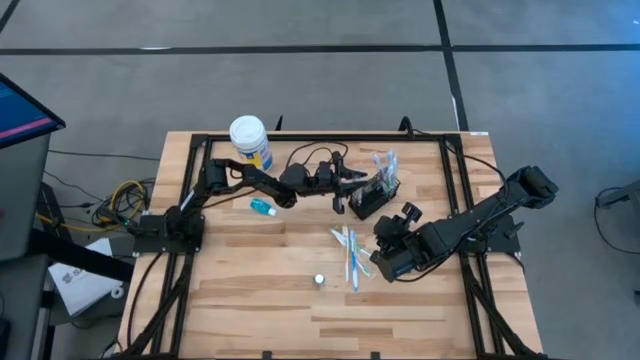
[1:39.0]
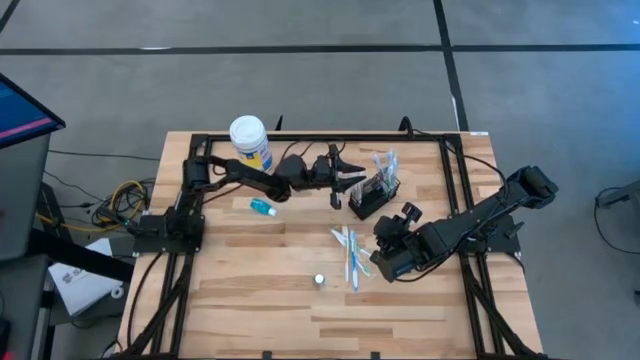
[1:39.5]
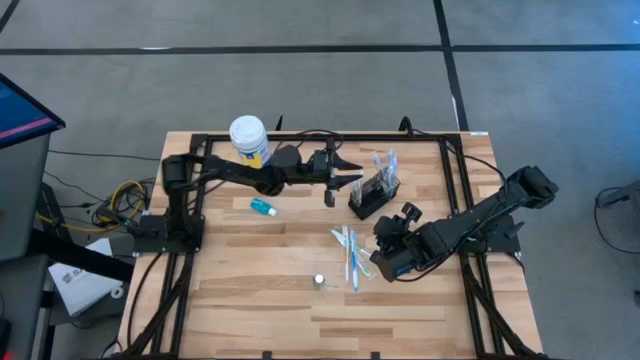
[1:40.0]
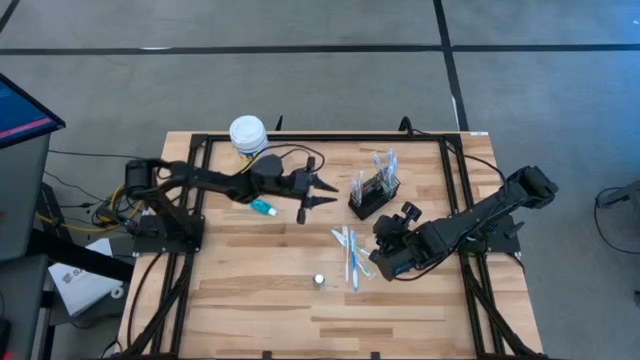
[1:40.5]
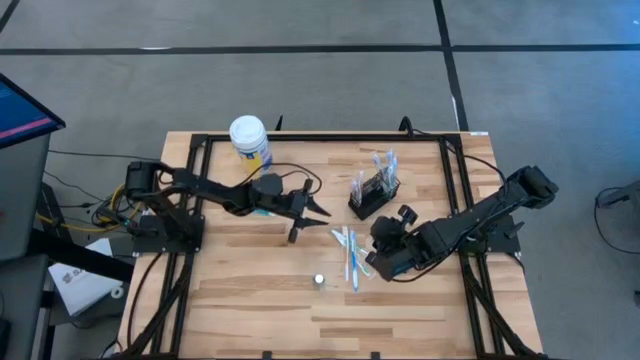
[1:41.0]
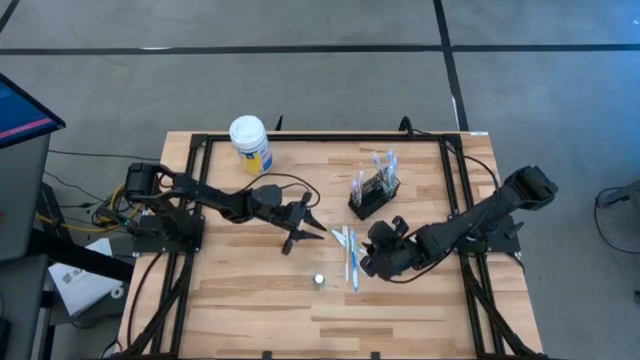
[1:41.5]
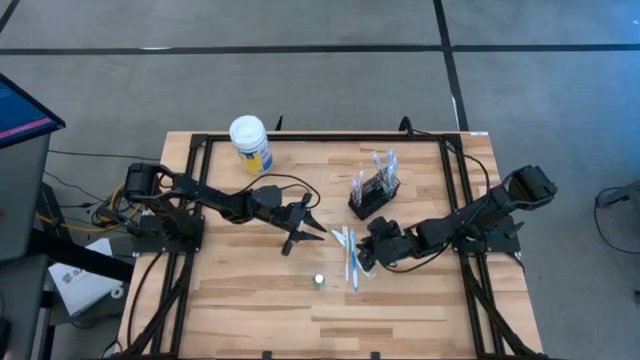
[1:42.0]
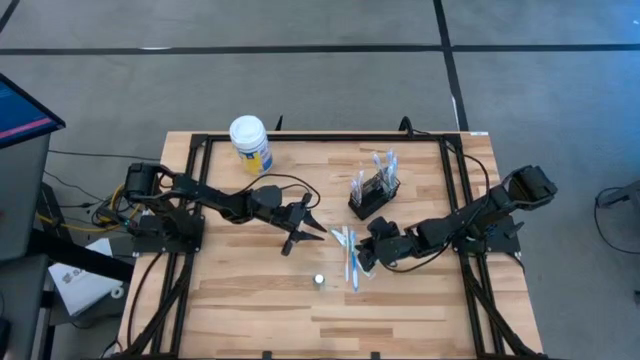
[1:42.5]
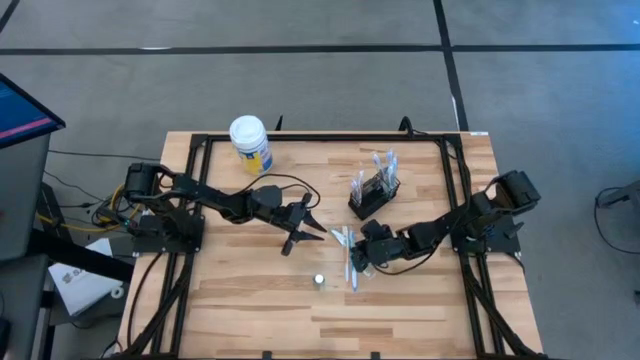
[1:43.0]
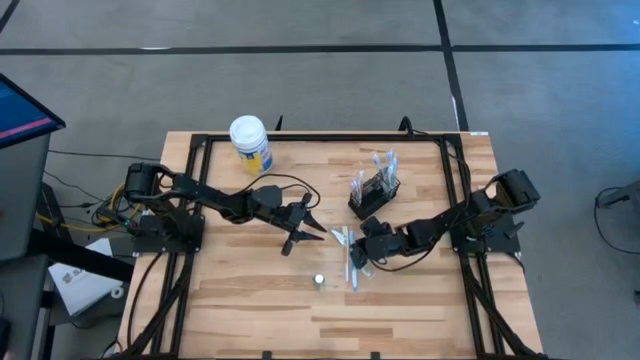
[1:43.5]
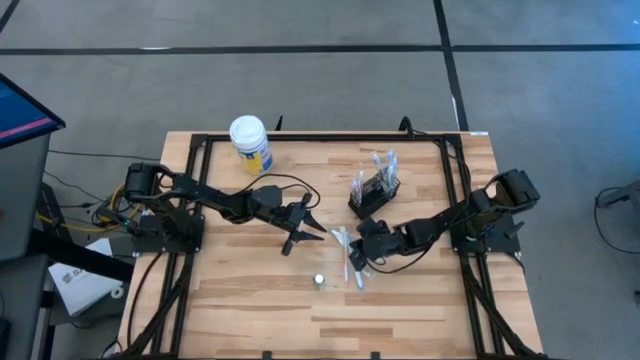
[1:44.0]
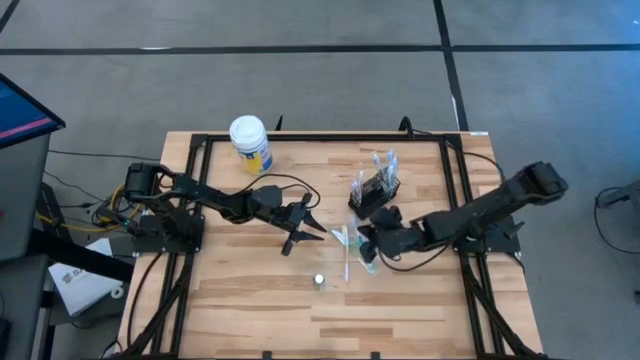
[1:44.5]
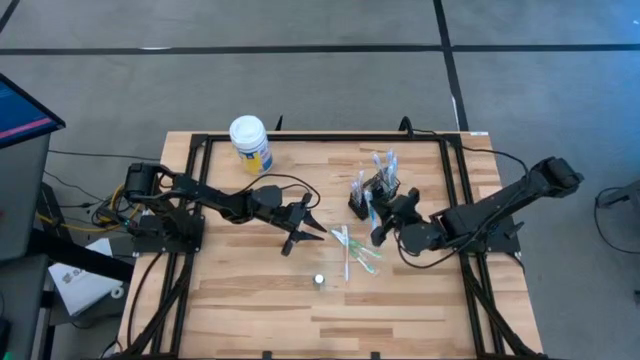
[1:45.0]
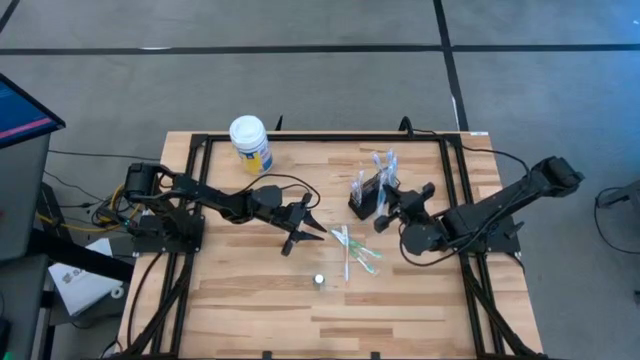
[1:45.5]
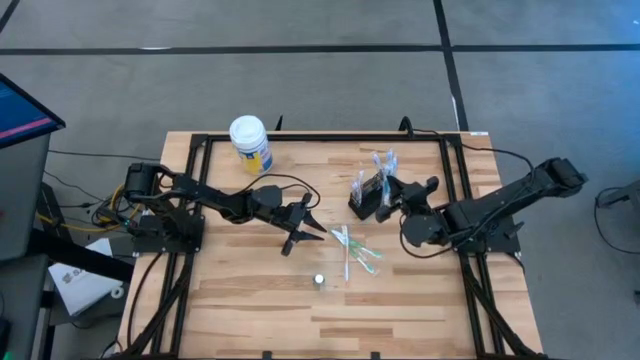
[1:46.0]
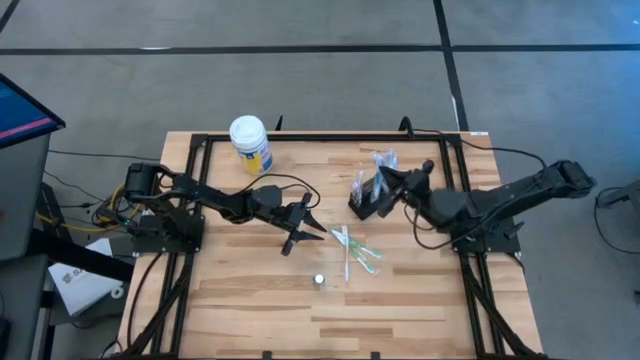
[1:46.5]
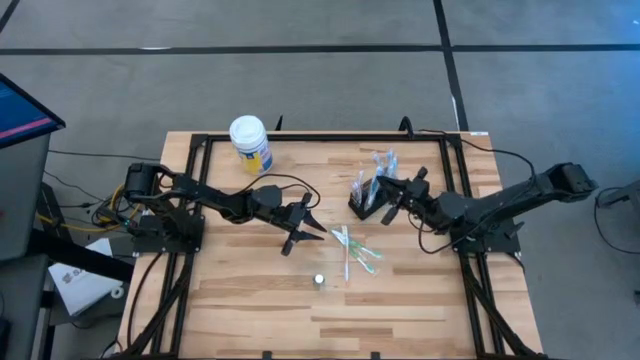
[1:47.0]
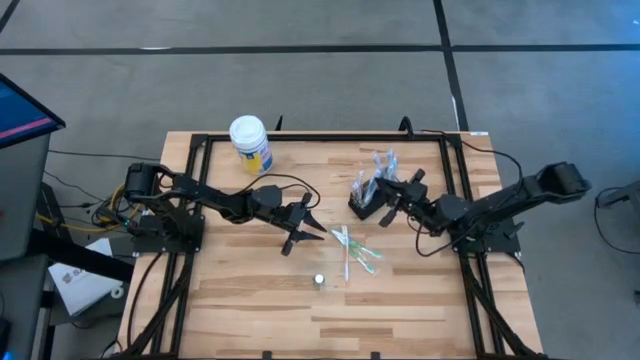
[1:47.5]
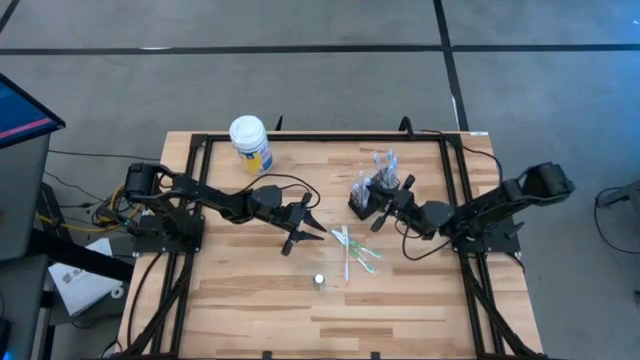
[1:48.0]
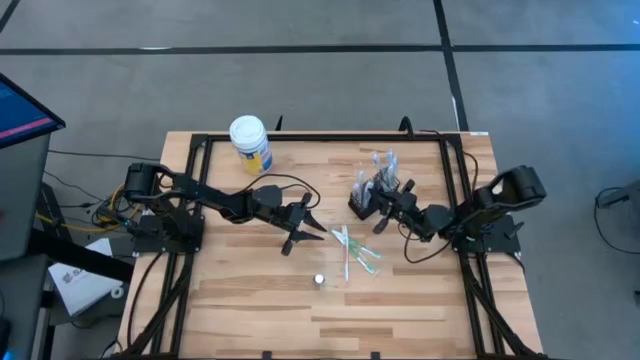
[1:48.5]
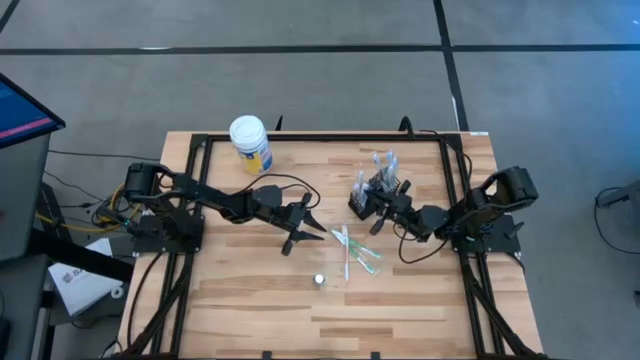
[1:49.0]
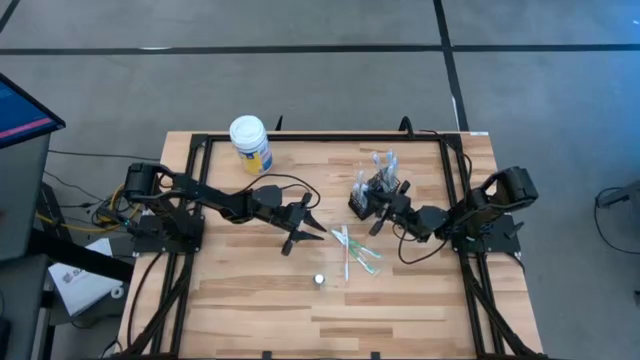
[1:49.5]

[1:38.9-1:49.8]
Task: Pick & Place toothbrushing station
Put the blue toothbrush into the mesh organizer

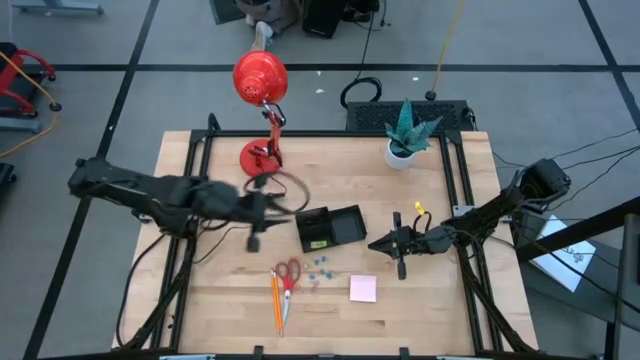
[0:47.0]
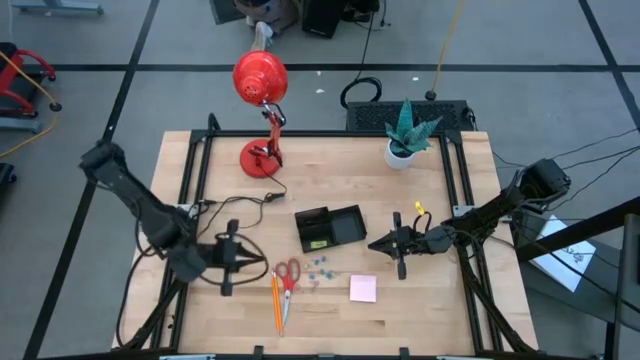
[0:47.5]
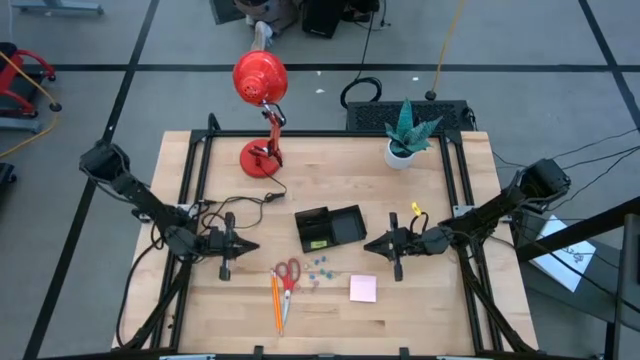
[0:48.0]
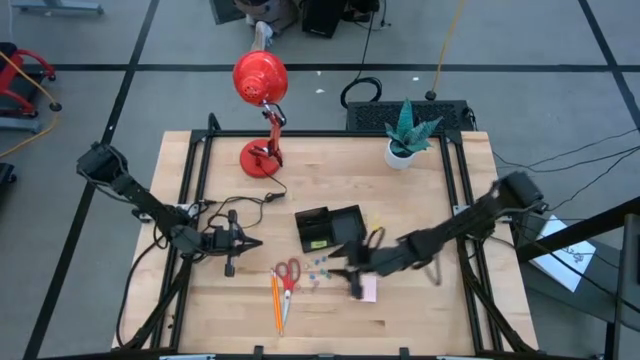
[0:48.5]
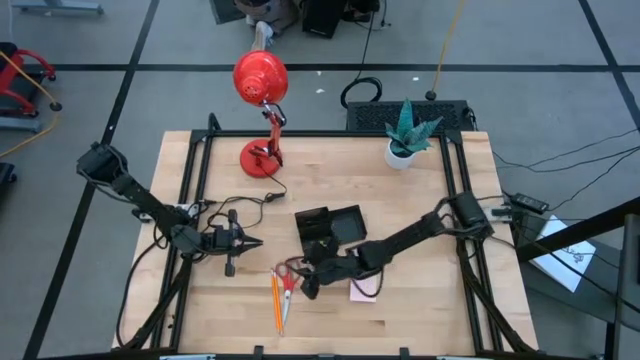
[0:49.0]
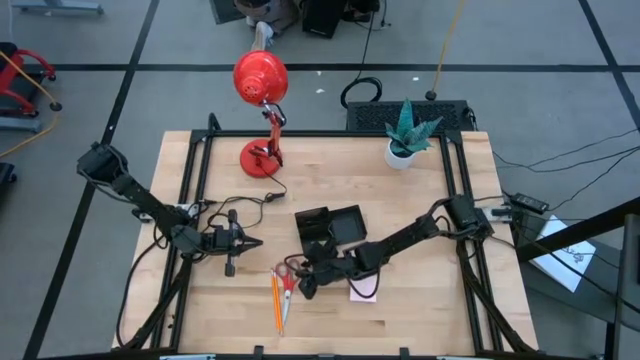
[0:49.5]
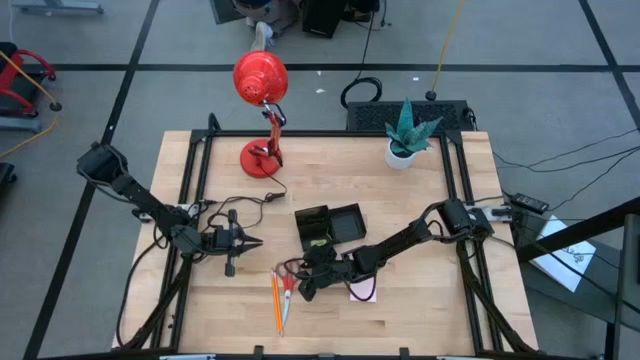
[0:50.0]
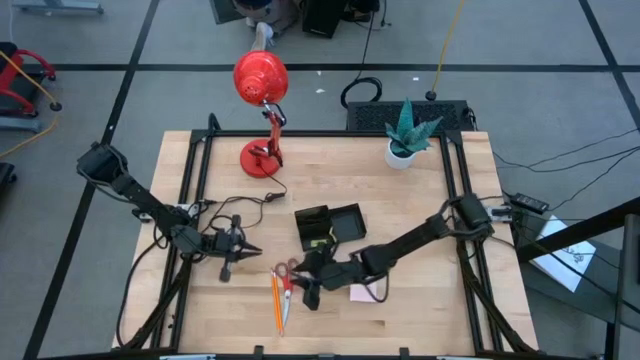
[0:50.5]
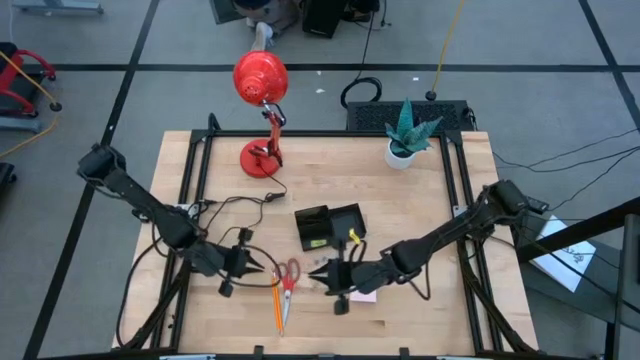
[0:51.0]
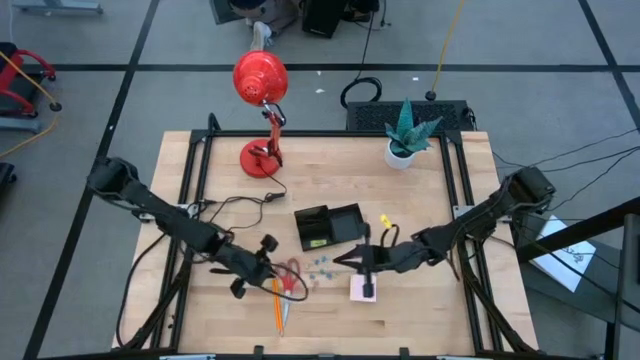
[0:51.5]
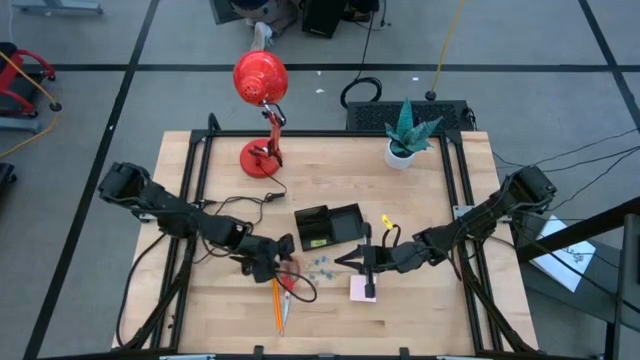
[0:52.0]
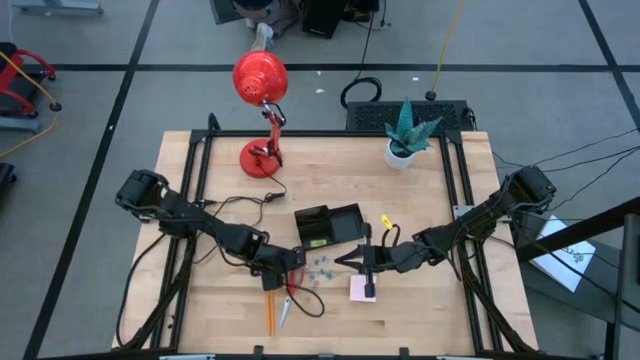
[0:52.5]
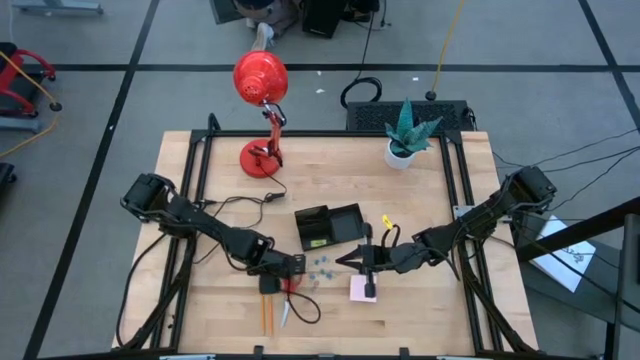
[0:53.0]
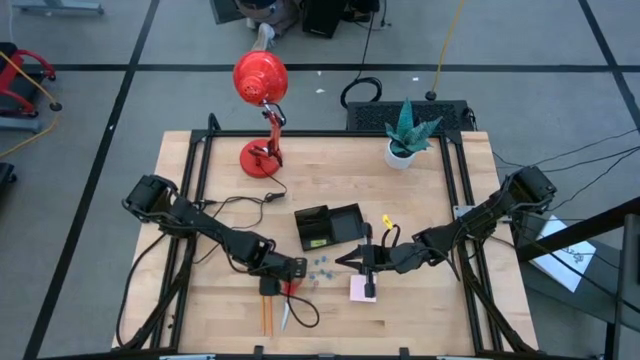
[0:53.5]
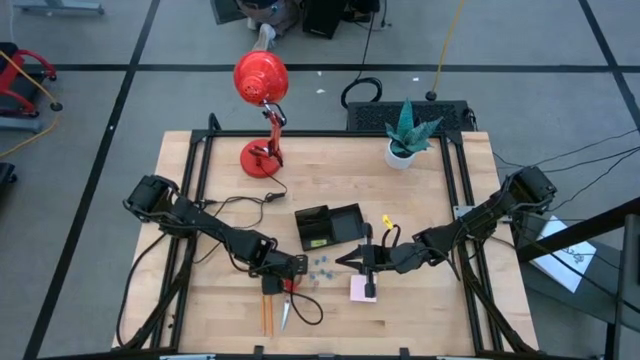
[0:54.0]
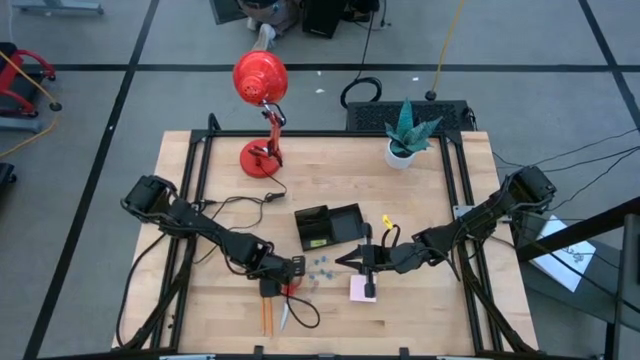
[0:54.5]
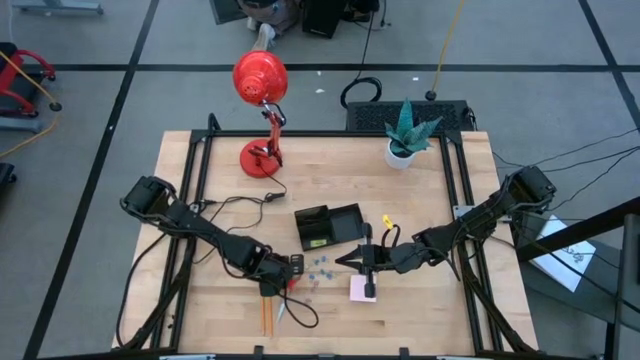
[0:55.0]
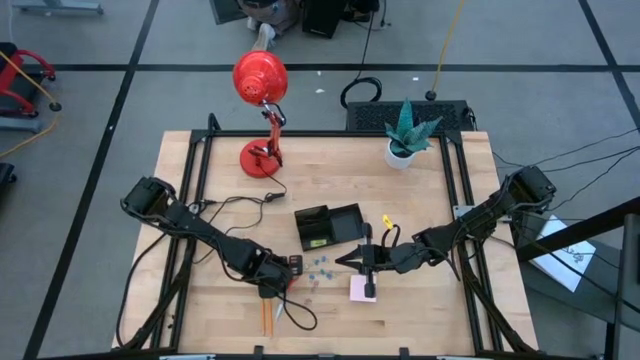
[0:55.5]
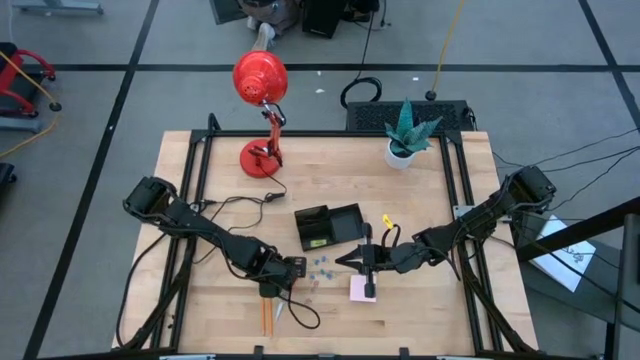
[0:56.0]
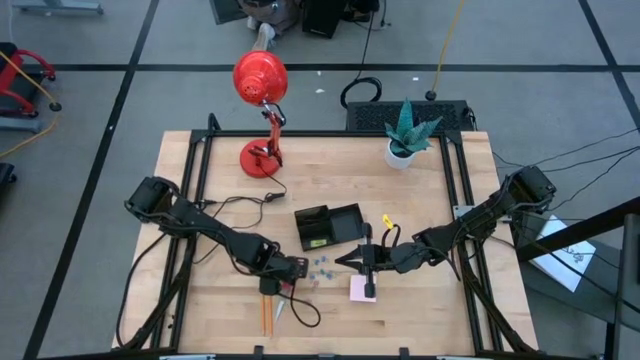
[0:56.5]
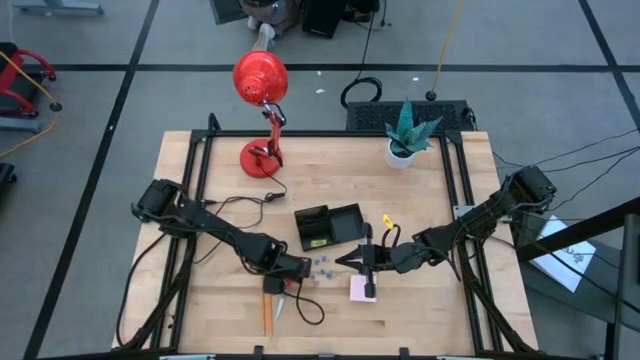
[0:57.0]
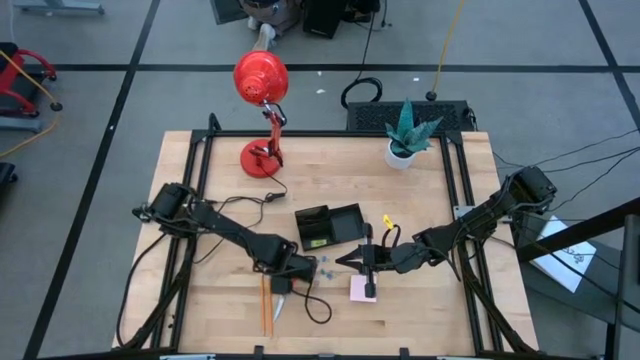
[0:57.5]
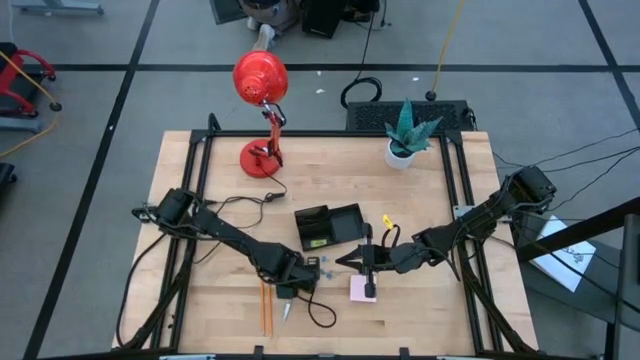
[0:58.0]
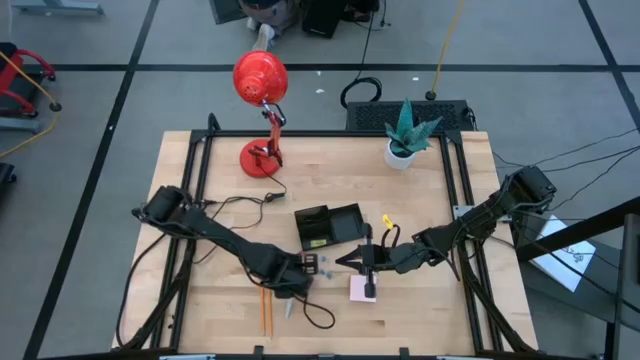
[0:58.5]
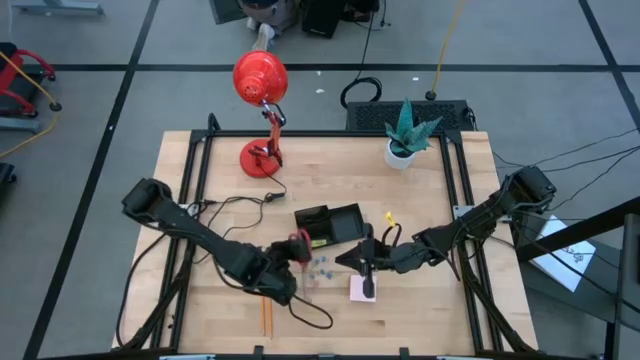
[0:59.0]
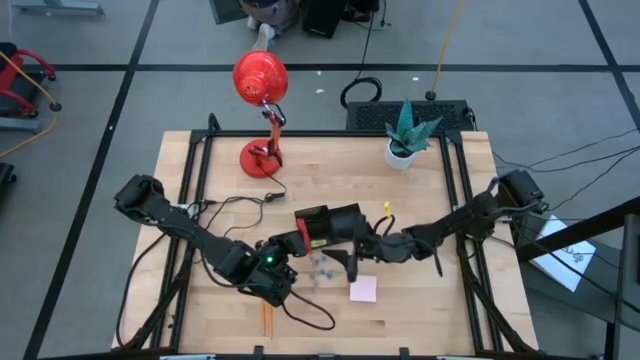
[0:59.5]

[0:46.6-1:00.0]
Task: Pick and place office supplies into organizer
Put the scissors into the desk organizer
